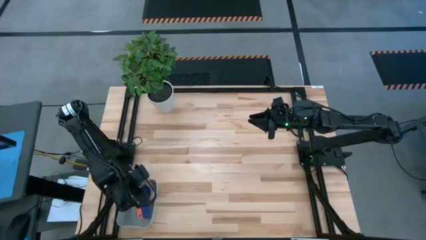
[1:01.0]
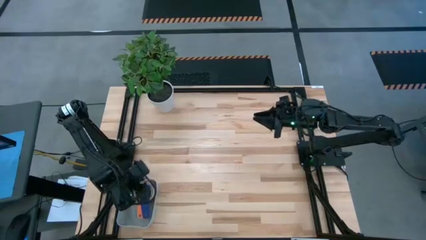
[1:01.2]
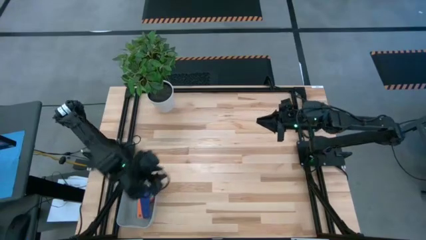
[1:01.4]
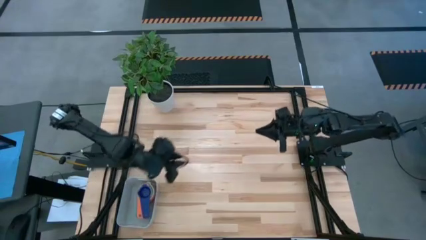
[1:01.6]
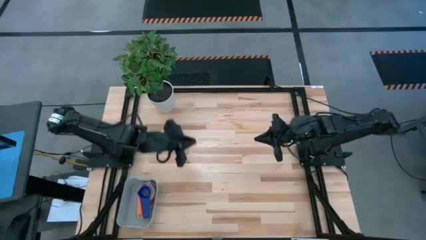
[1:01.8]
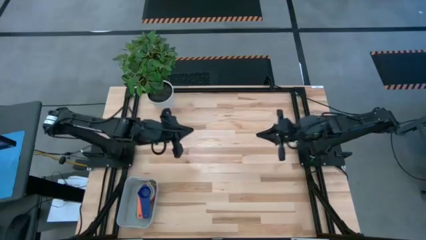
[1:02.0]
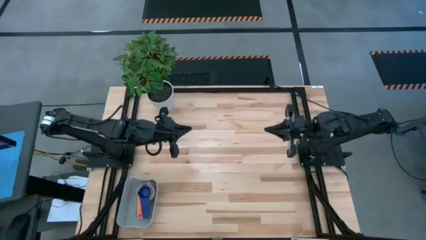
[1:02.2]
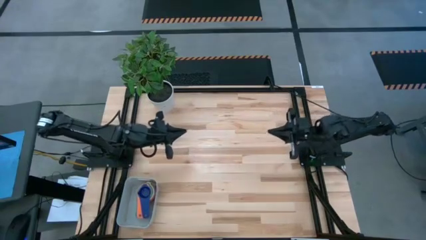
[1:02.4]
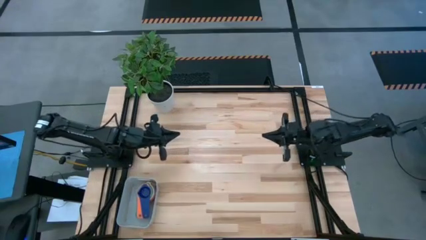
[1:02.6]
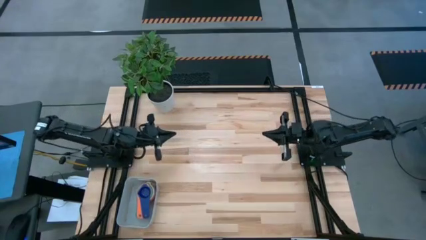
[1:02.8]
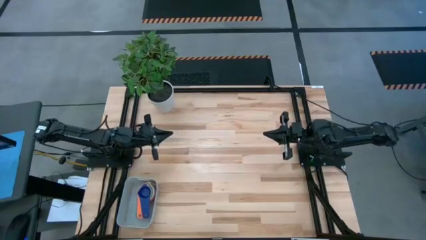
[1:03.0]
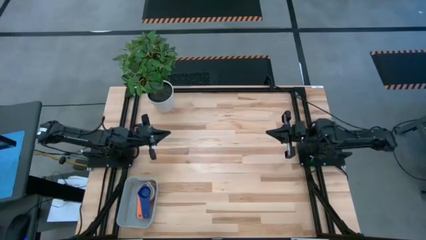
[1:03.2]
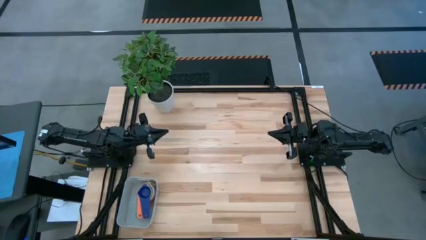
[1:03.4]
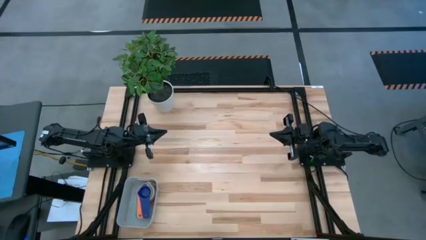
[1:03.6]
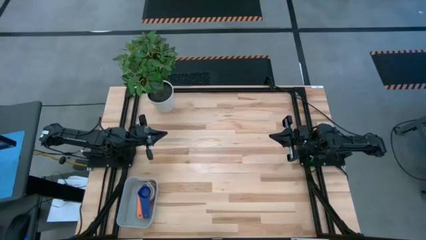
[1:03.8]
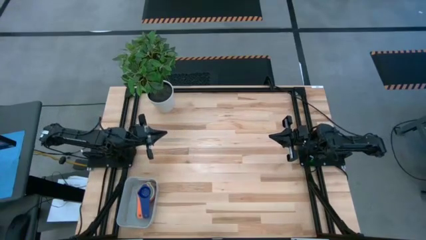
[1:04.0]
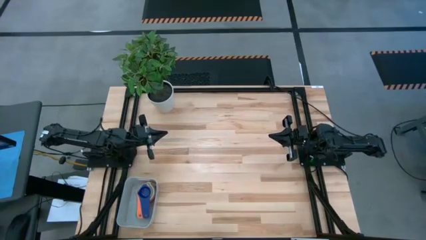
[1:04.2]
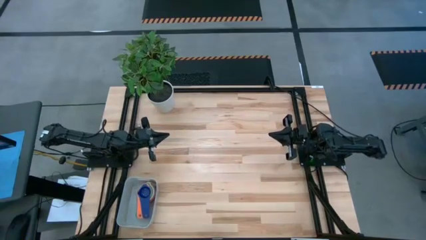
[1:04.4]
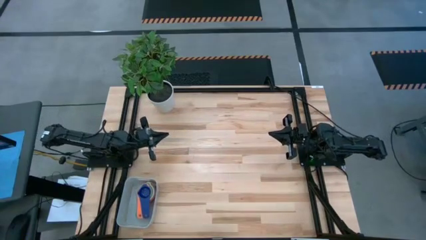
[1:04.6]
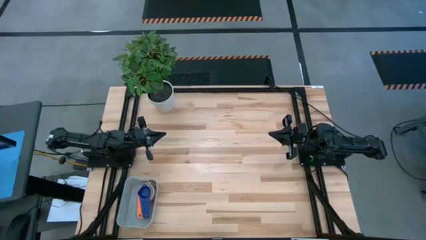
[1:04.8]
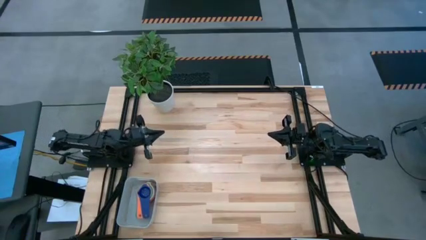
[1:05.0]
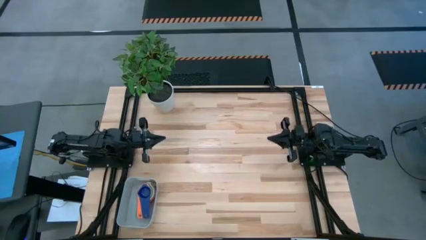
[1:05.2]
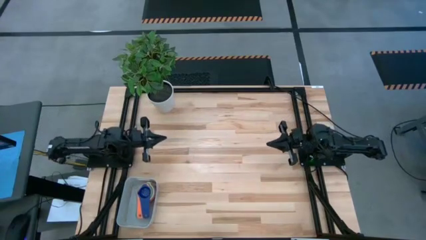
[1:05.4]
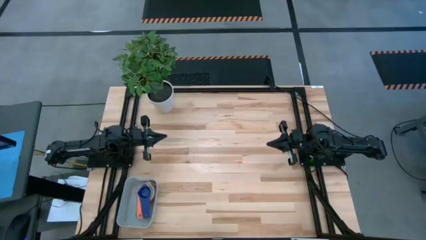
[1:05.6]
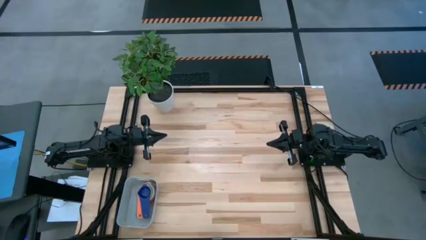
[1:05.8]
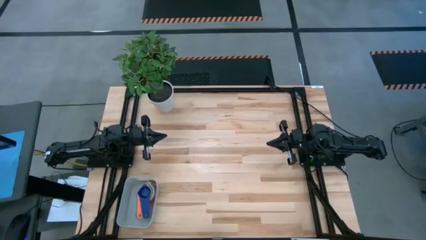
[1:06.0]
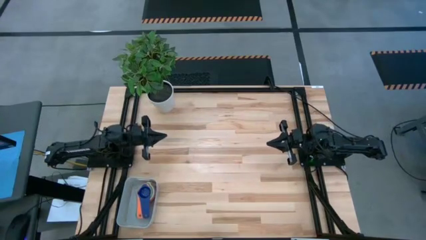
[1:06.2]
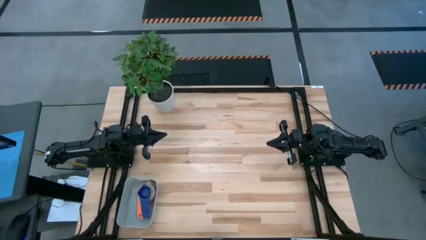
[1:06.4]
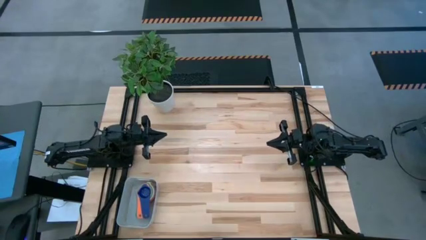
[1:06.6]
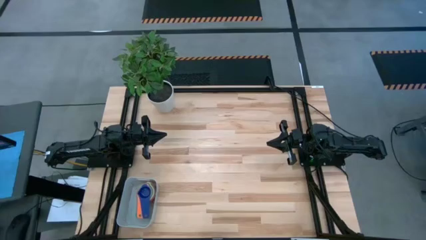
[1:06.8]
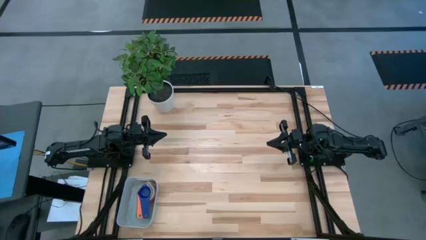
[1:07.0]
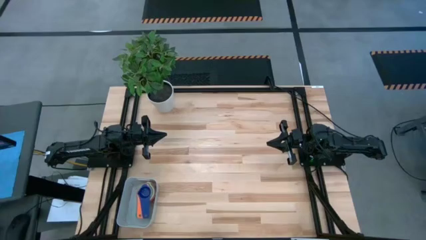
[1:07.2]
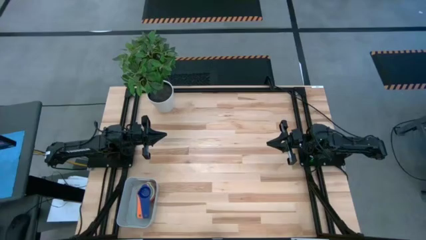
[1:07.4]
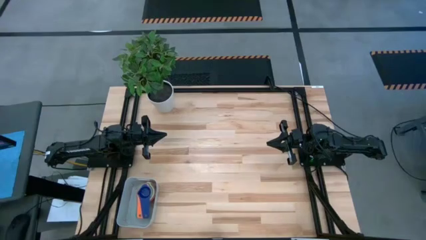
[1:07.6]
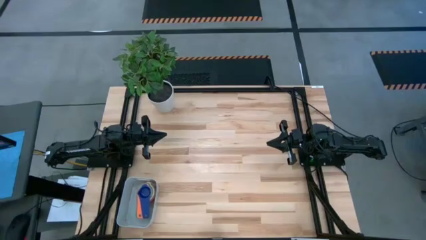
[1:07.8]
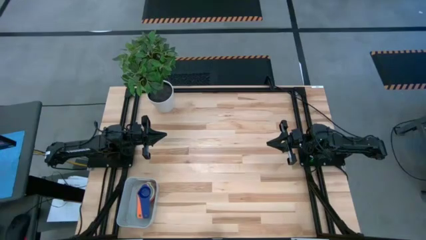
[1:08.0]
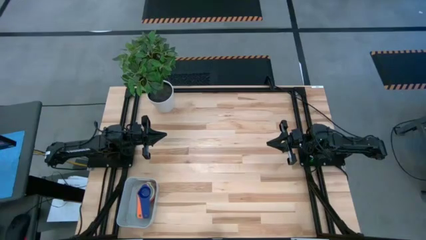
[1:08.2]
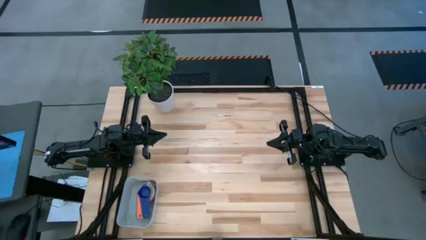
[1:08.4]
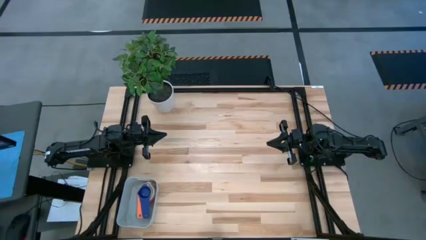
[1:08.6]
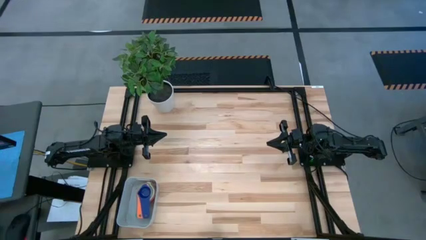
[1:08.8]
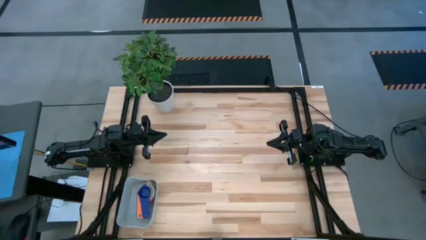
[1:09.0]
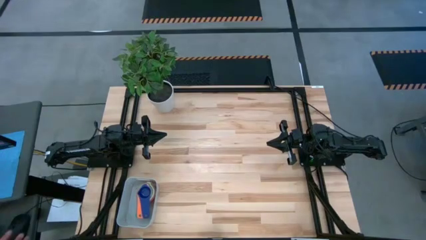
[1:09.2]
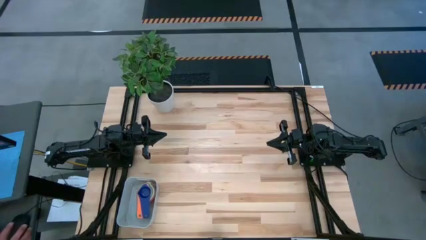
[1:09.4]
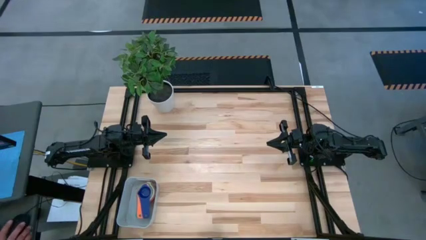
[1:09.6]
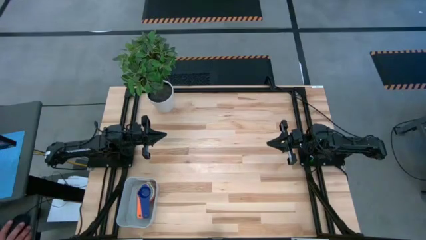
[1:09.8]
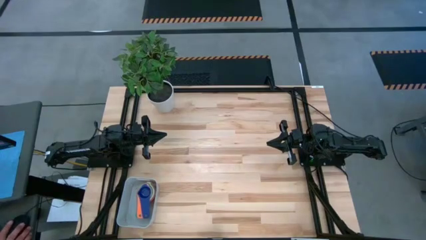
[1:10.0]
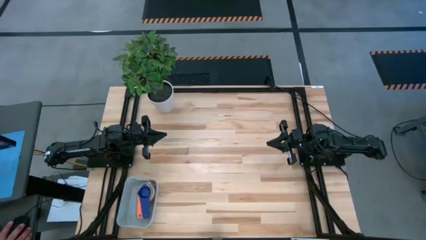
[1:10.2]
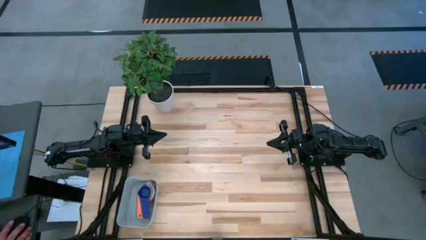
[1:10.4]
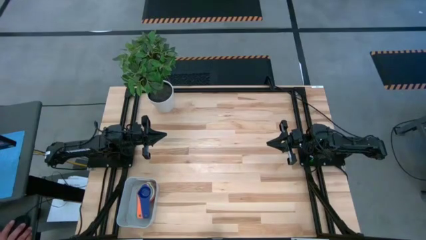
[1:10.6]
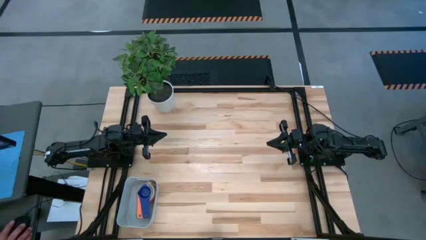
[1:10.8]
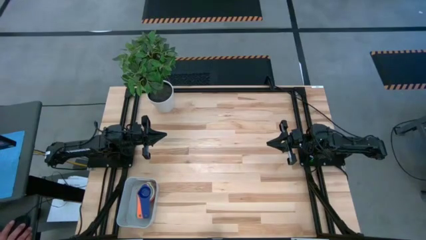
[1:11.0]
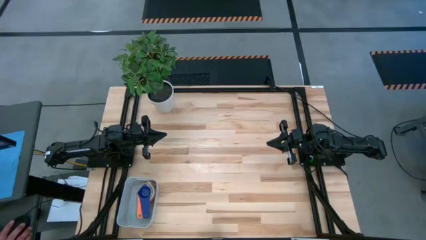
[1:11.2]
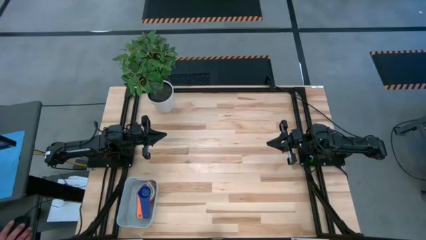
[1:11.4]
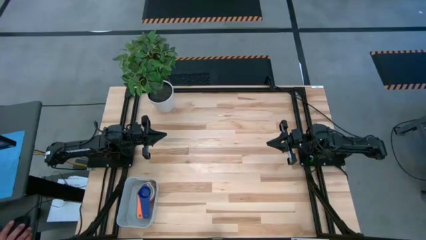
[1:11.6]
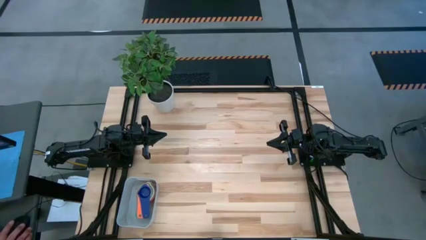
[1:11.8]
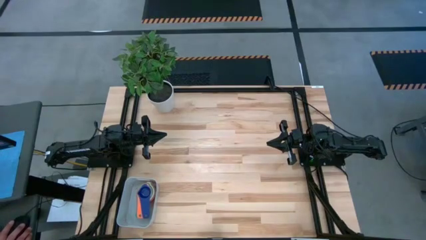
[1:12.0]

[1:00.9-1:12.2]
Task: Nest measuring cups in basket
Return to Home Position
